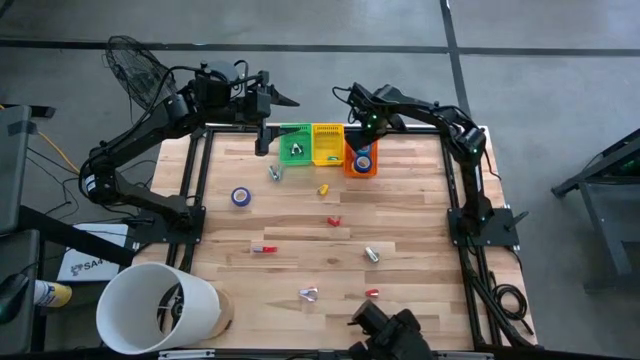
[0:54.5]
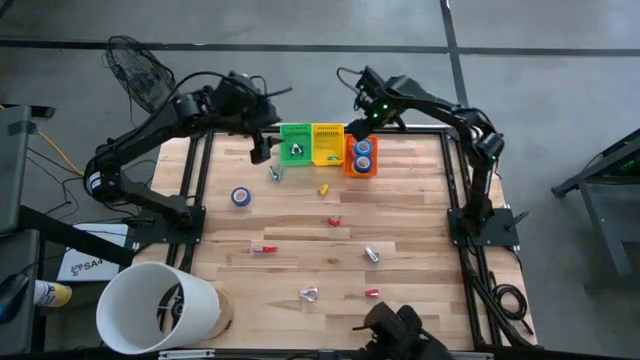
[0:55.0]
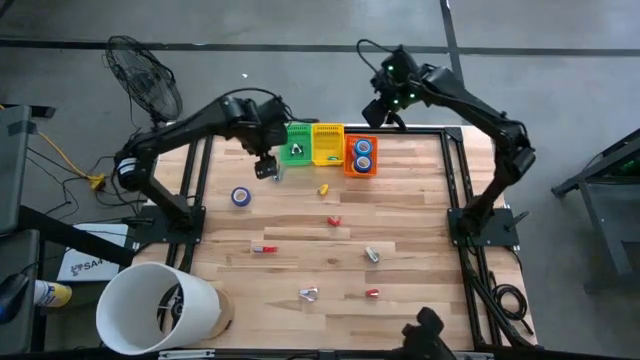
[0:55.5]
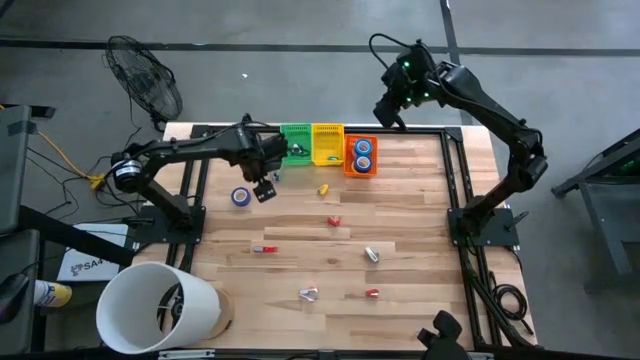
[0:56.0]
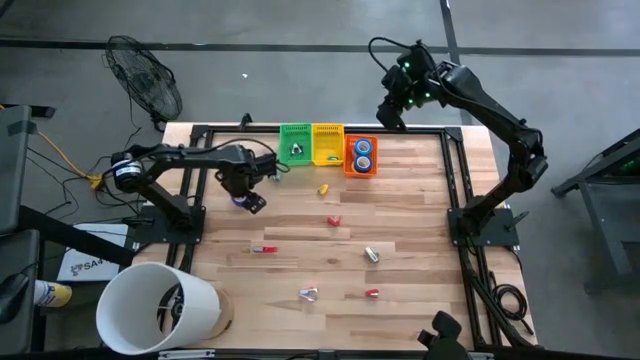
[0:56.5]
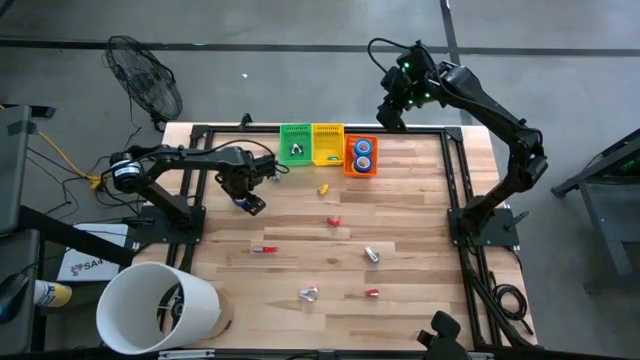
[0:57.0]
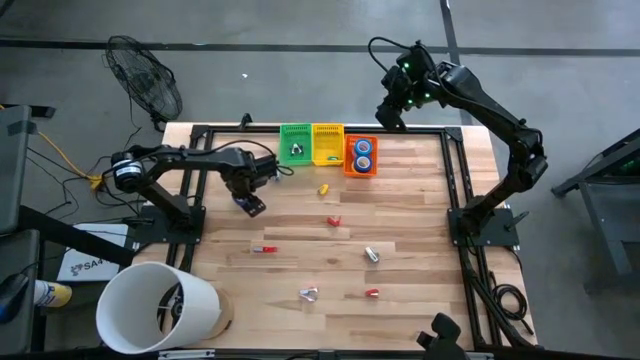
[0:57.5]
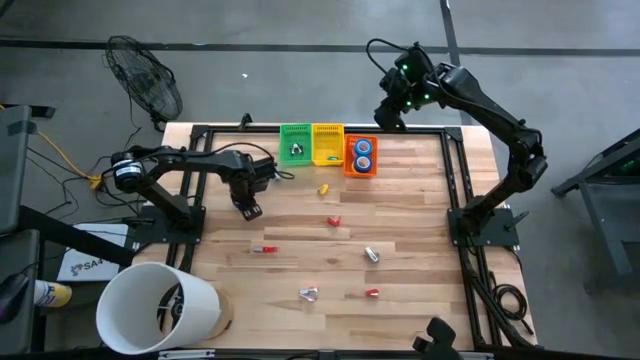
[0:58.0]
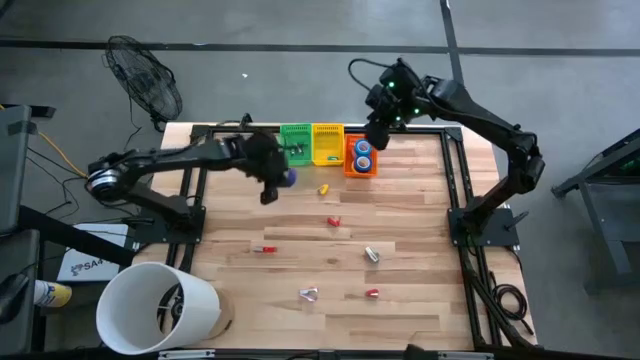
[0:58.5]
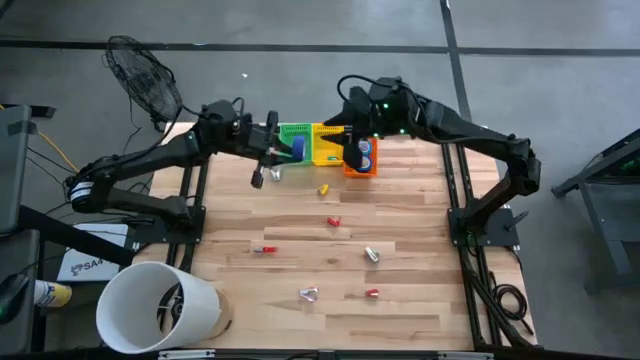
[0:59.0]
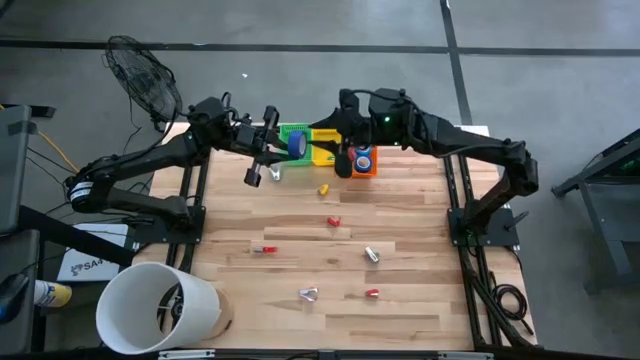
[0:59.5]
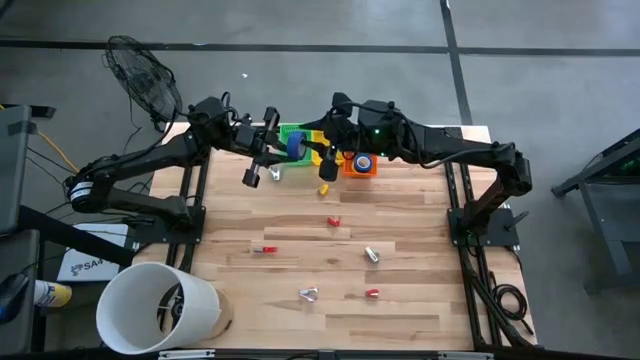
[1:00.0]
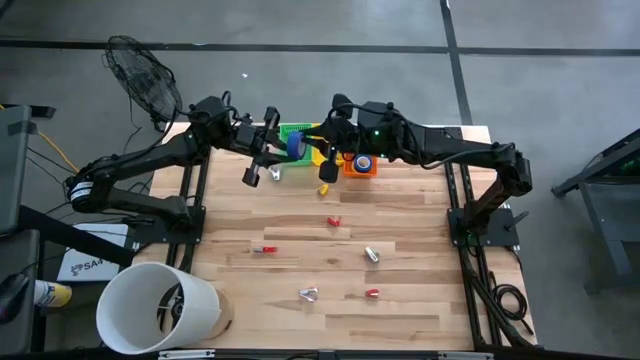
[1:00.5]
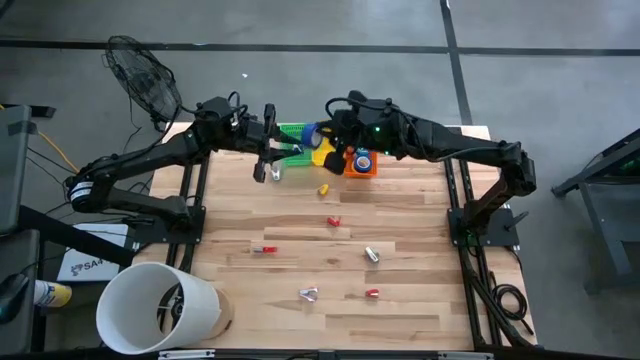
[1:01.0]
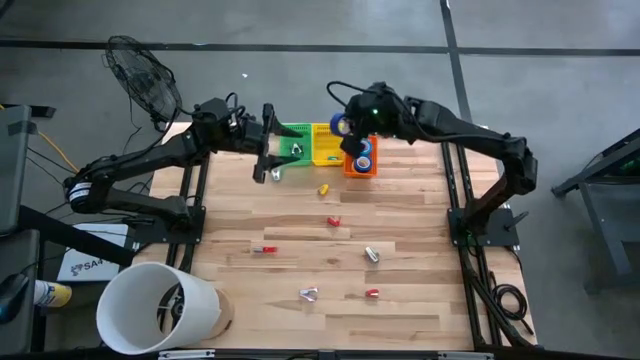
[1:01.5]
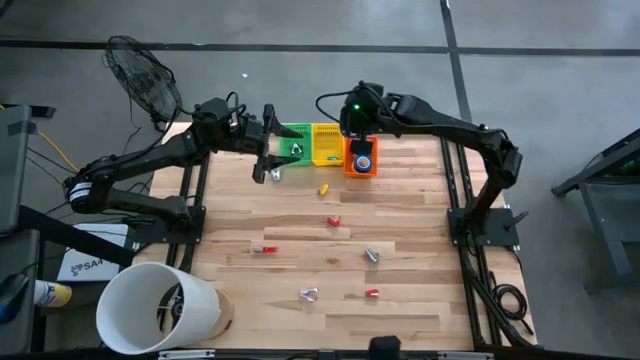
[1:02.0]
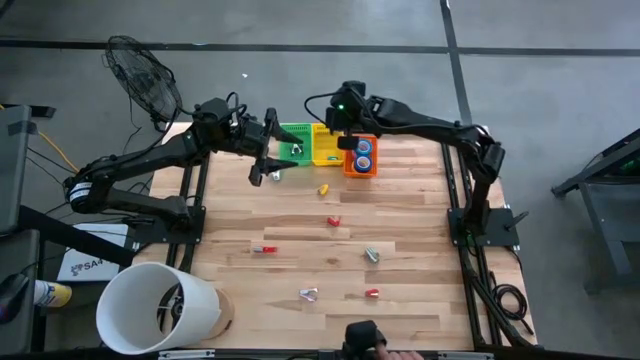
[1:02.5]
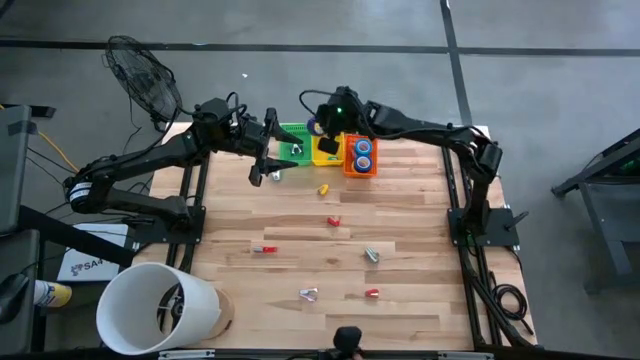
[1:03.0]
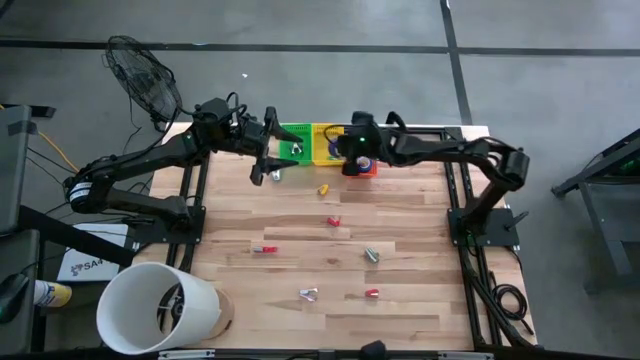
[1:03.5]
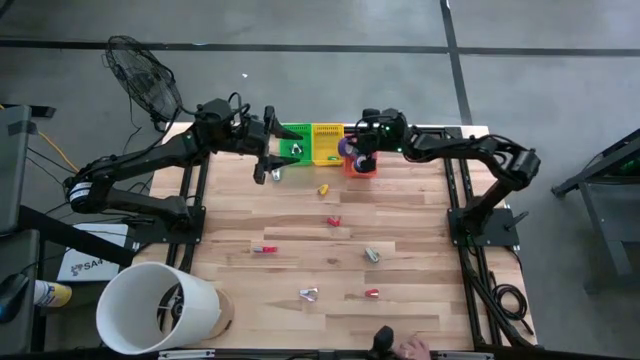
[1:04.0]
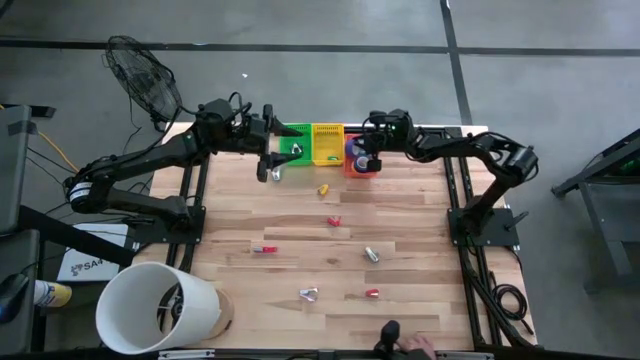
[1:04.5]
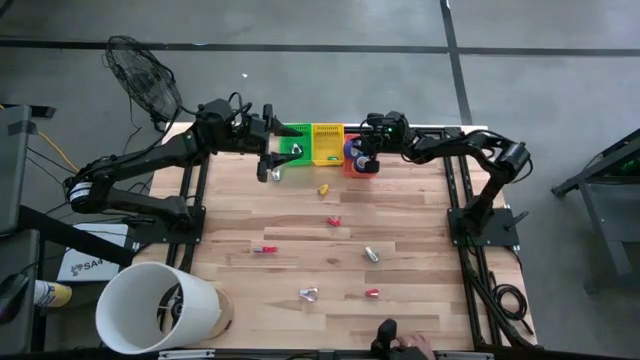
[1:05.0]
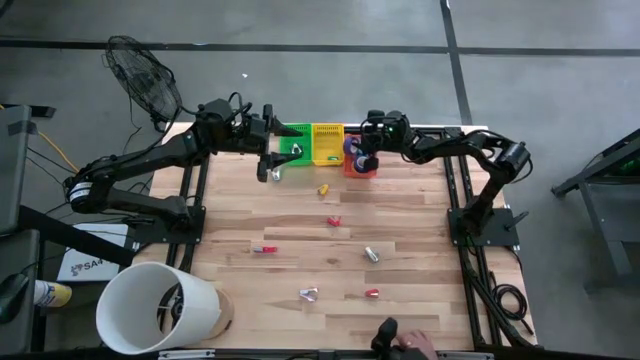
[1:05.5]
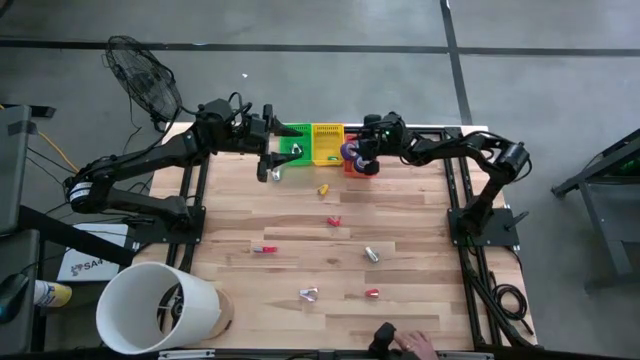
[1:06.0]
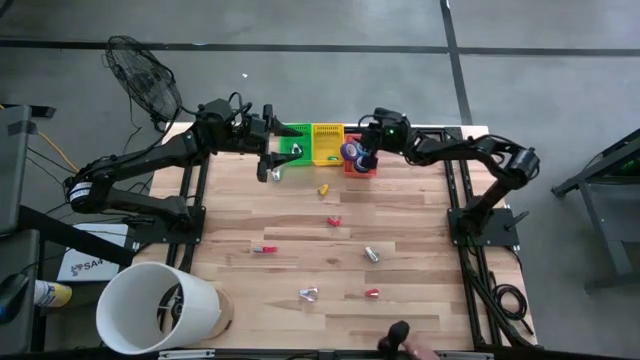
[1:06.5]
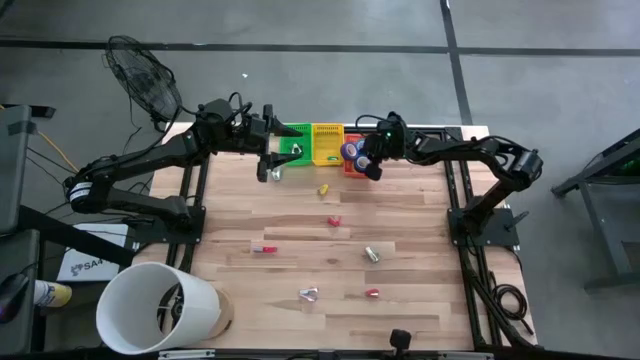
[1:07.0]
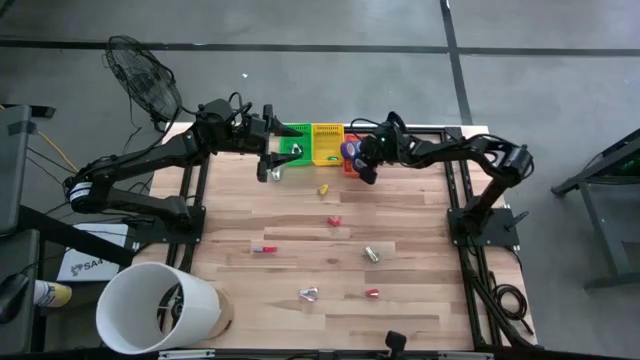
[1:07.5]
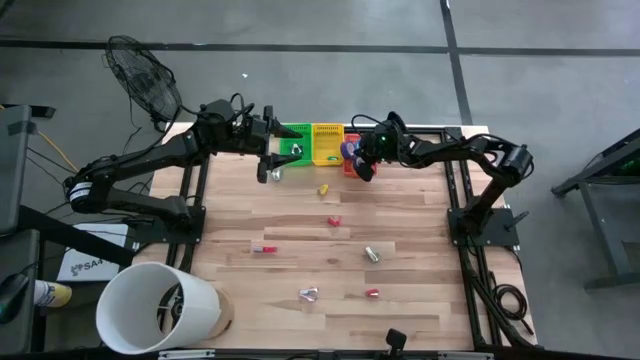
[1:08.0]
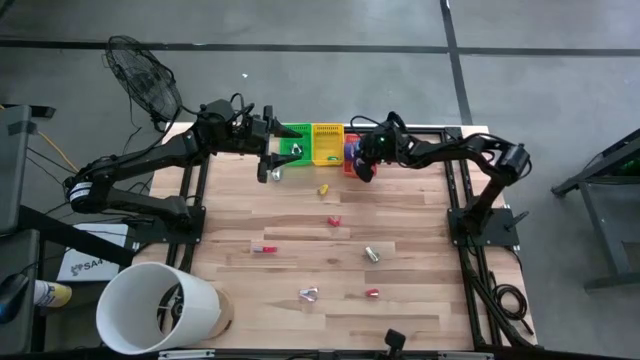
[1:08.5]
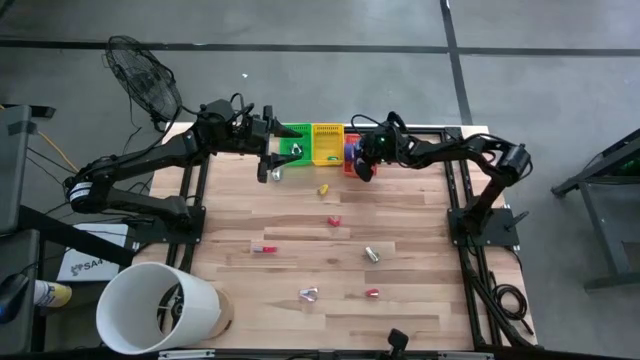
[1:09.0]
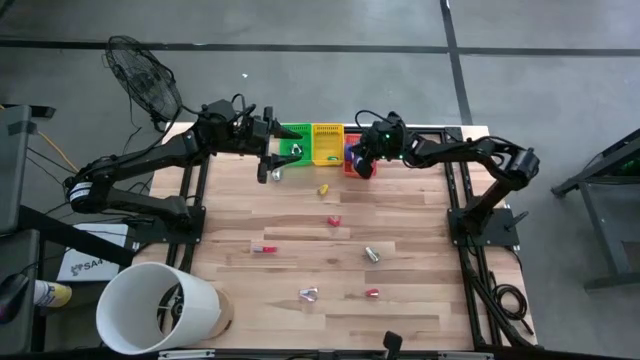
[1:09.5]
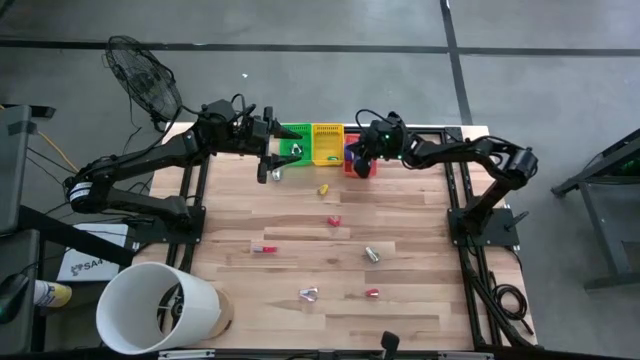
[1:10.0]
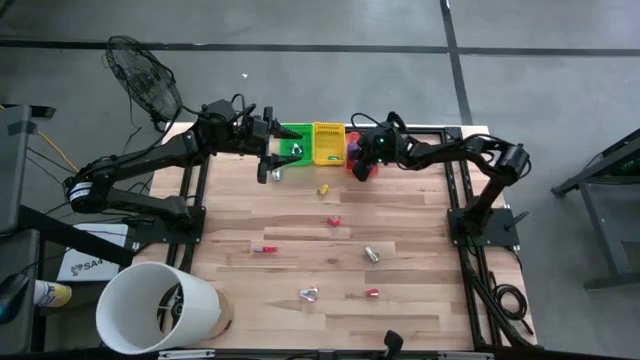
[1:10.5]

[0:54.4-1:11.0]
Task: Pick and place Stapler, Stapler remover, tape
Put the purple tape into the orange bin

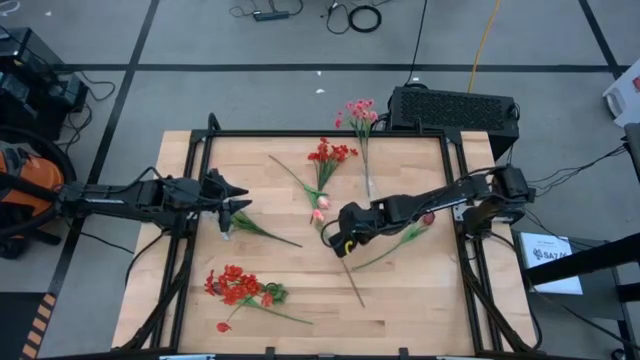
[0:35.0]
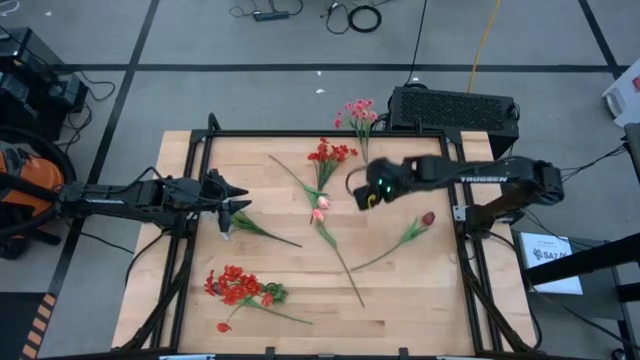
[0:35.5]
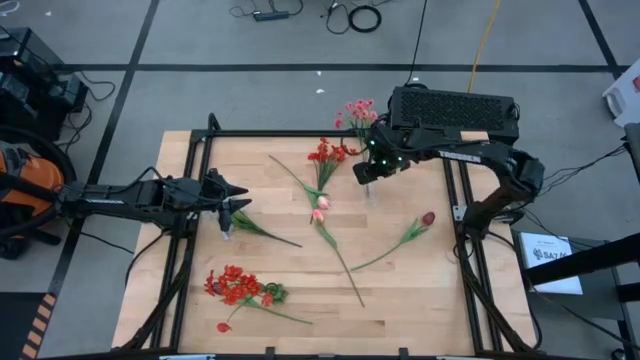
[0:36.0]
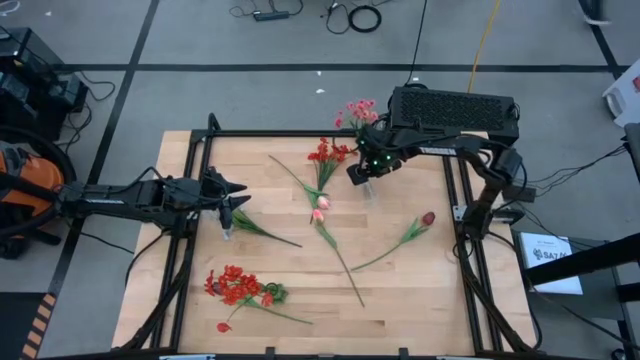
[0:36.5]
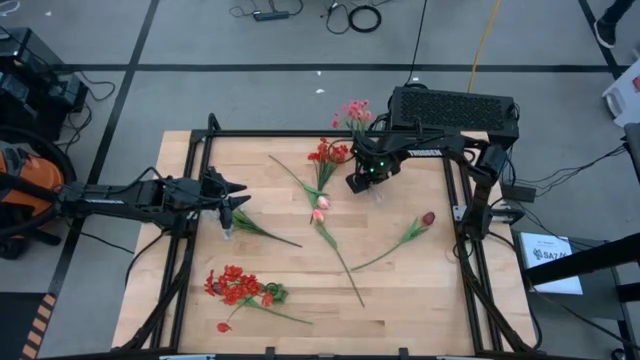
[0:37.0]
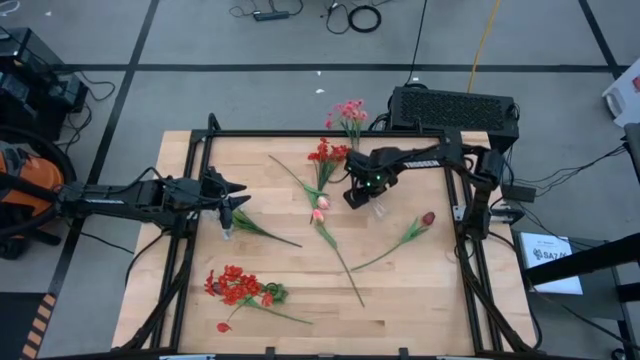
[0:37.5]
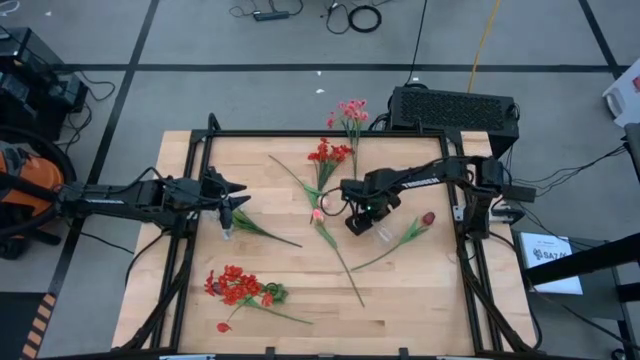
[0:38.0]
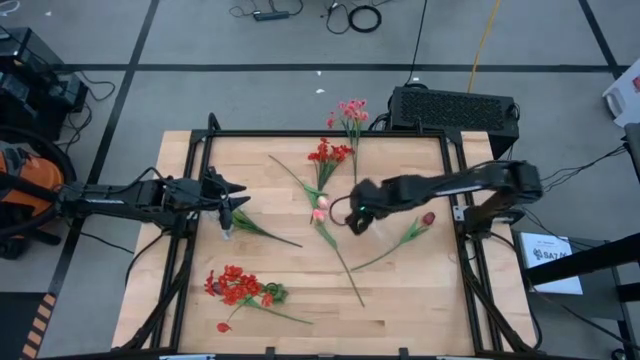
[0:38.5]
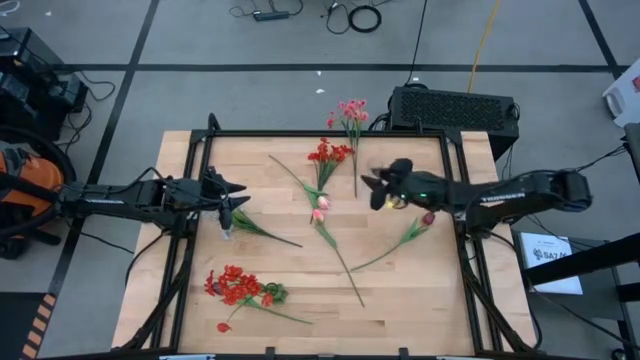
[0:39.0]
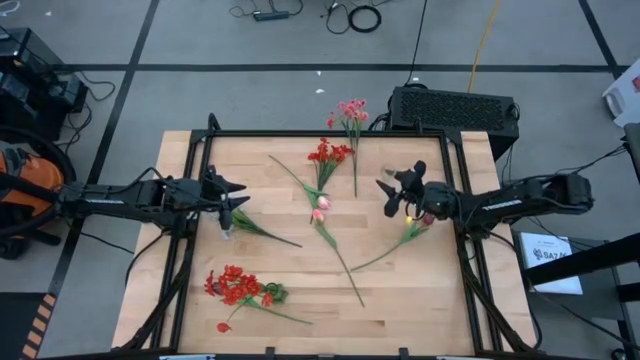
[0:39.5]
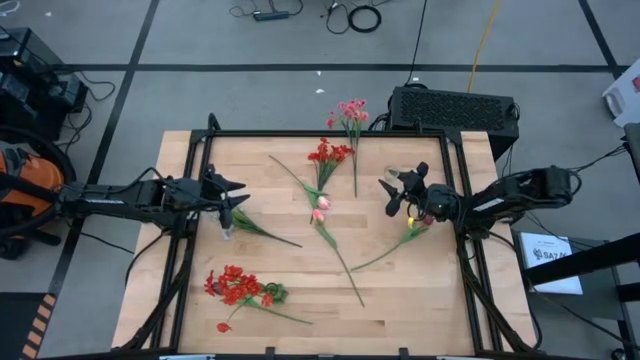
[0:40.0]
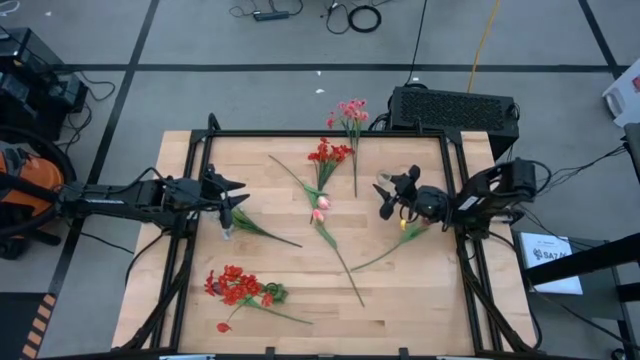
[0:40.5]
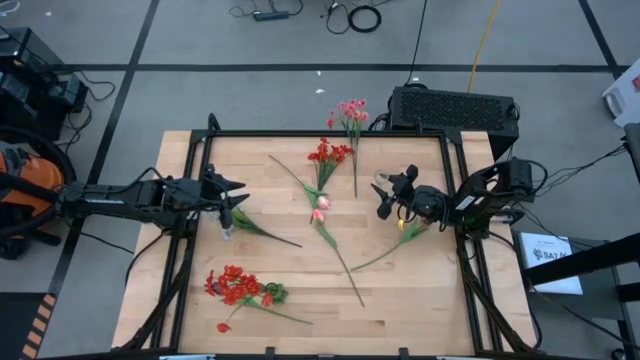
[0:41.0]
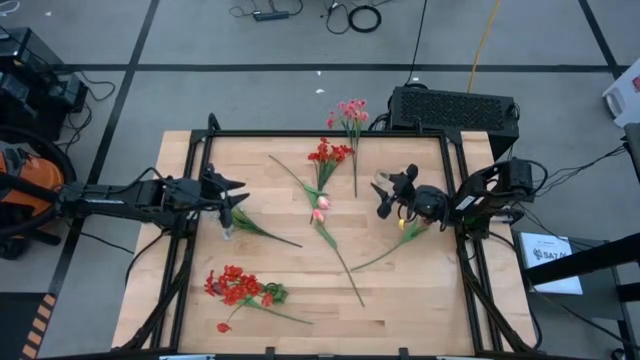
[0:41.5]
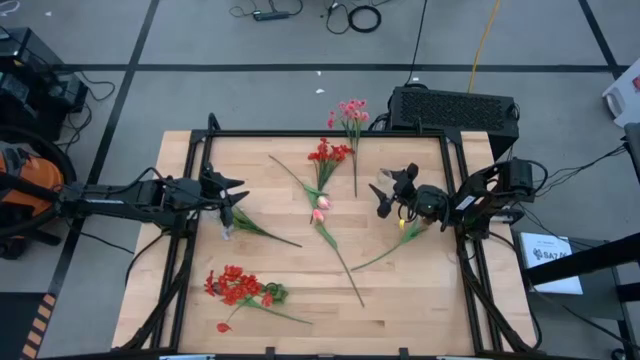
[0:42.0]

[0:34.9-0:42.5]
Task: Sort flowers into vase by color
Adjust the transparent vase
